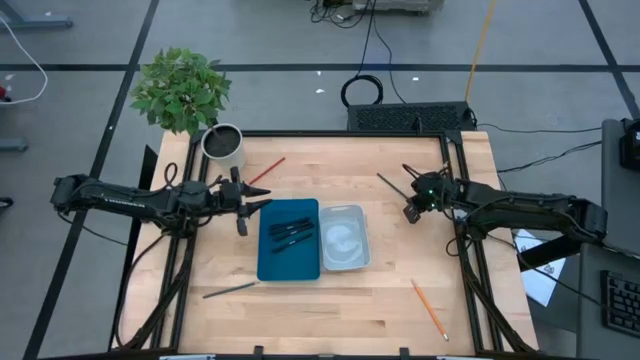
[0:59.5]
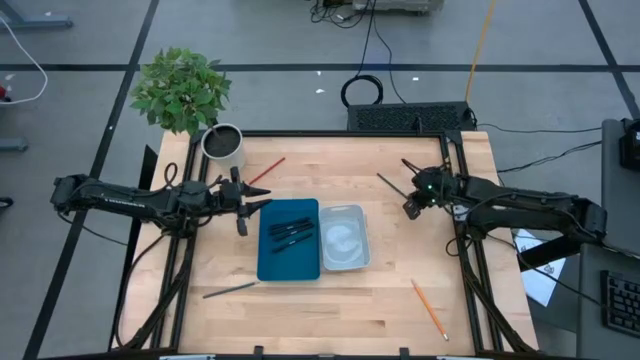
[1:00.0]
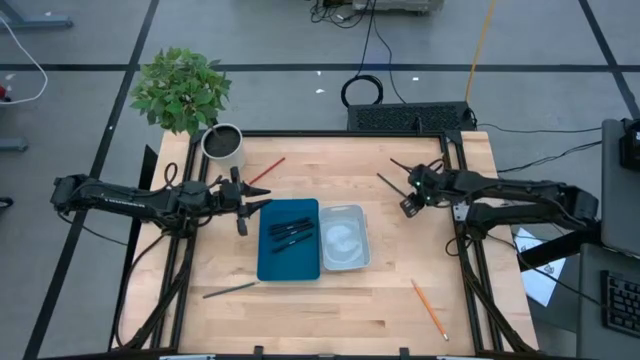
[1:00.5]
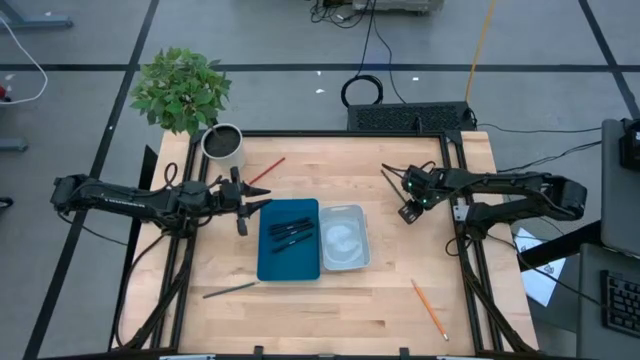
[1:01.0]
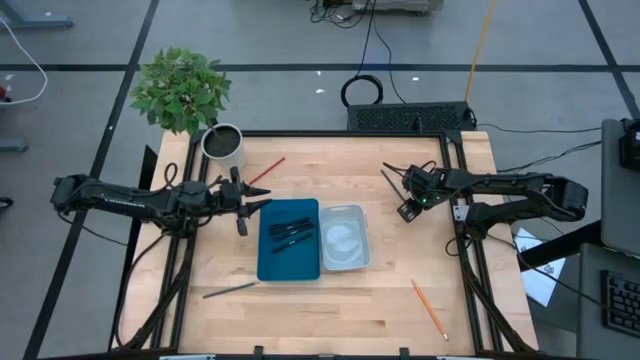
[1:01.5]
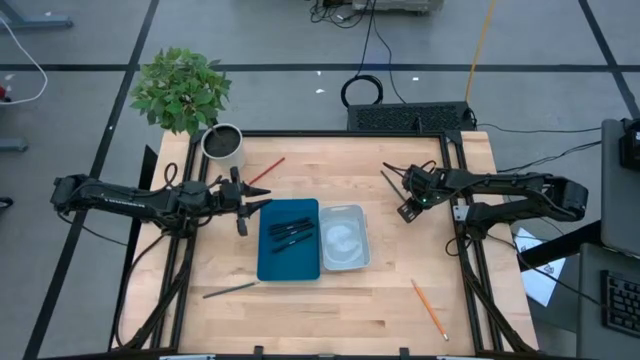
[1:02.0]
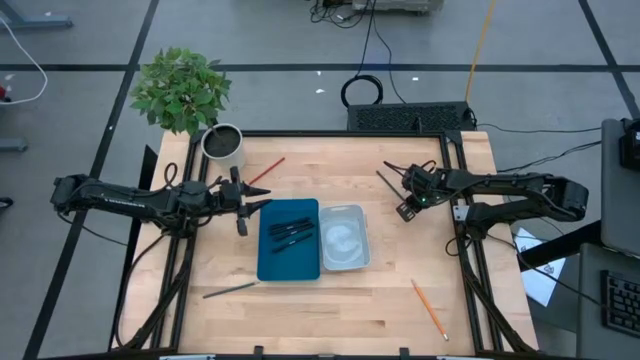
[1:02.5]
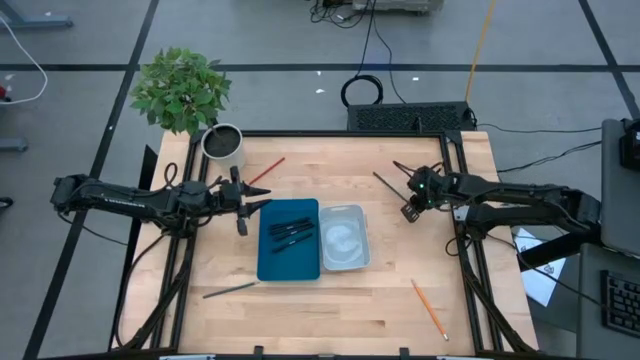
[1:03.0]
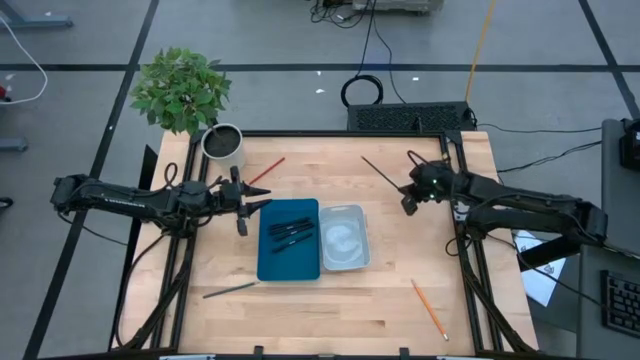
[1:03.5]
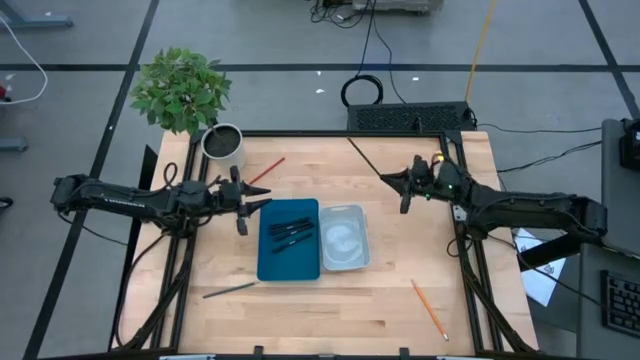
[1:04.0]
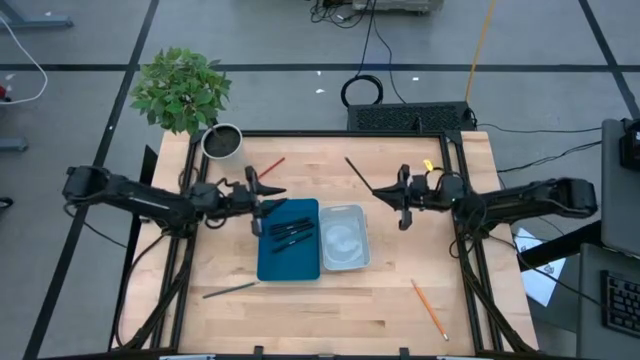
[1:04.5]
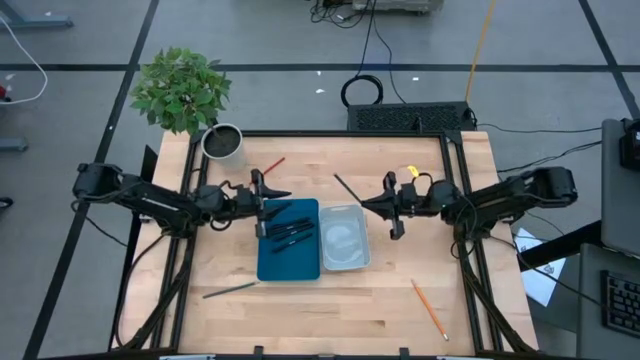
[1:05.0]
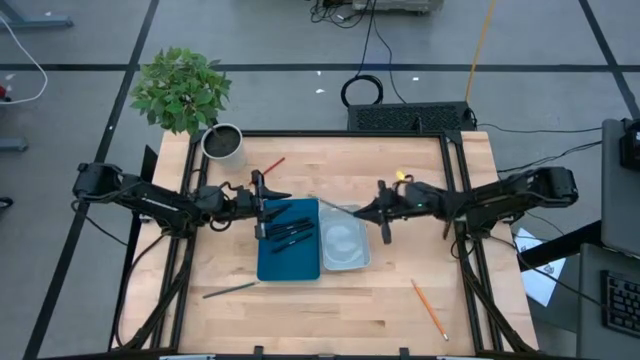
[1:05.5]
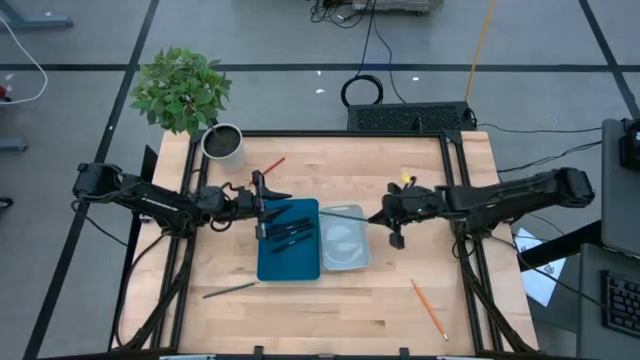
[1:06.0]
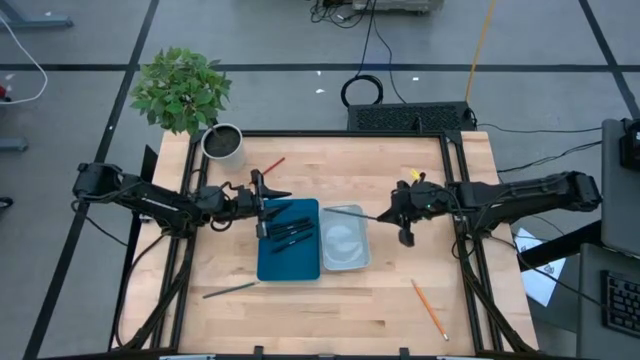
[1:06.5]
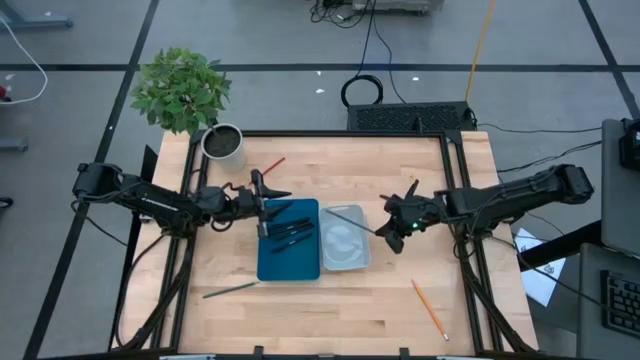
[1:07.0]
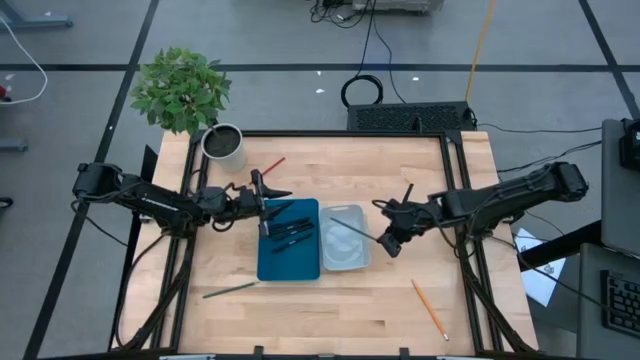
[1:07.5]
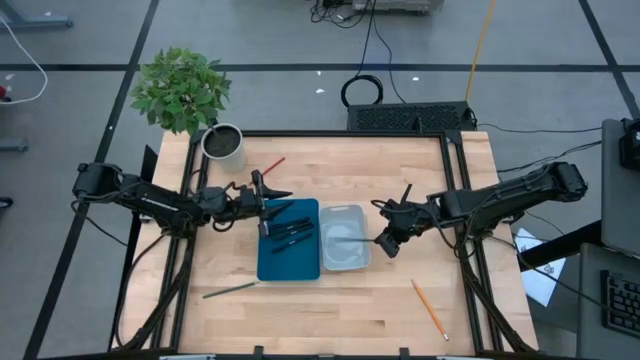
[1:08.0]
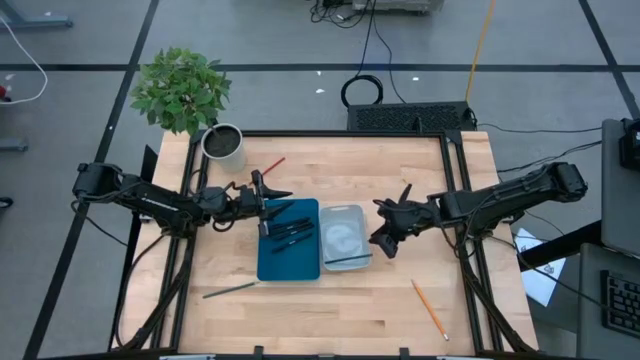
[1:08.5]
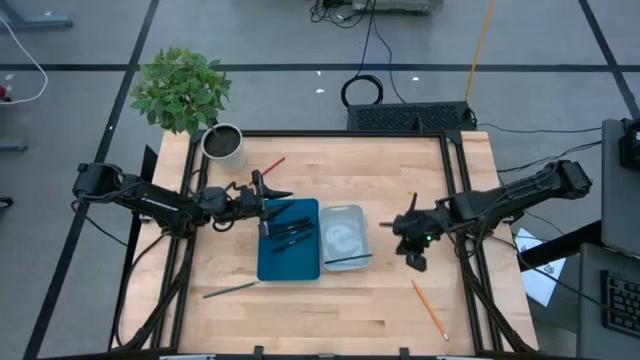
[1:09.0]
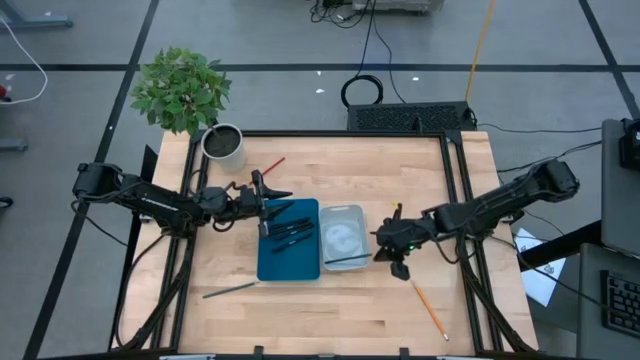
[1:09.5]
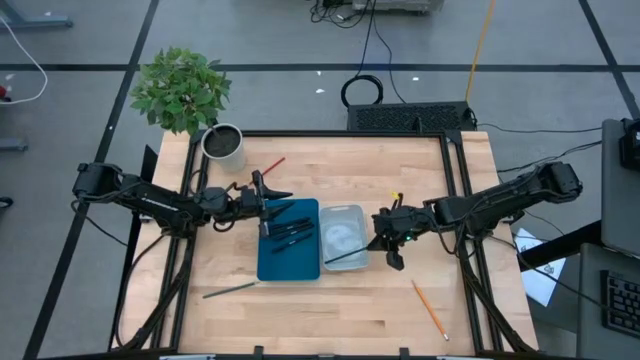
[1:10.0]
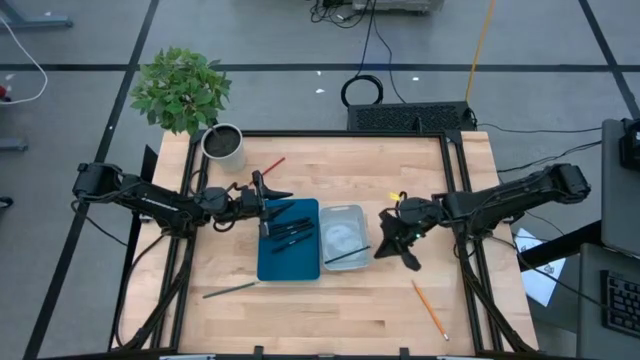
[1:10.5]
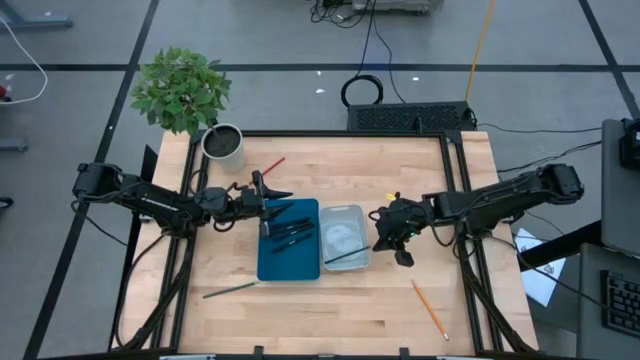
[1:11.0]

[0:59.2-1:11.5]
Task: Sort pens & pencils
Put the top green colored pencil into the white bin

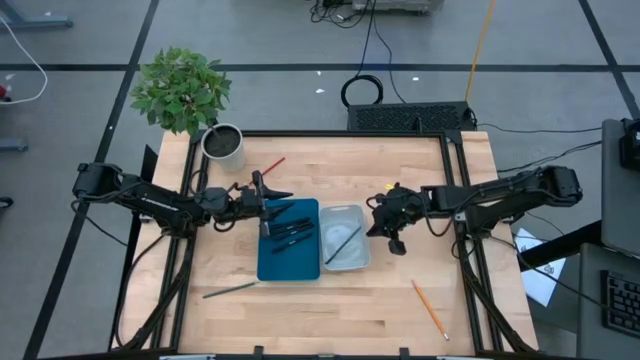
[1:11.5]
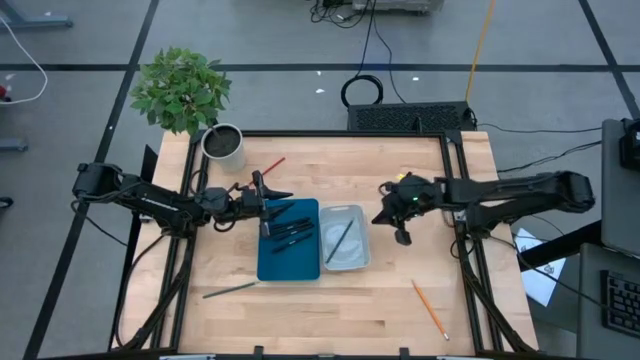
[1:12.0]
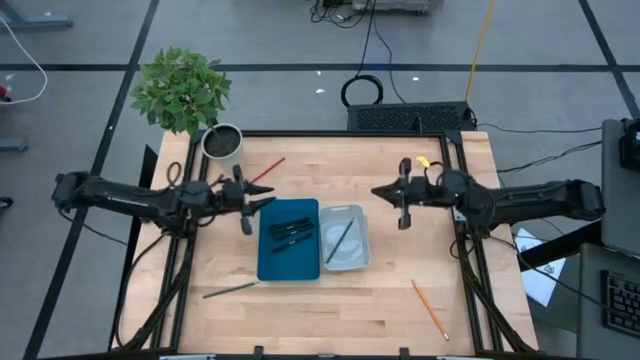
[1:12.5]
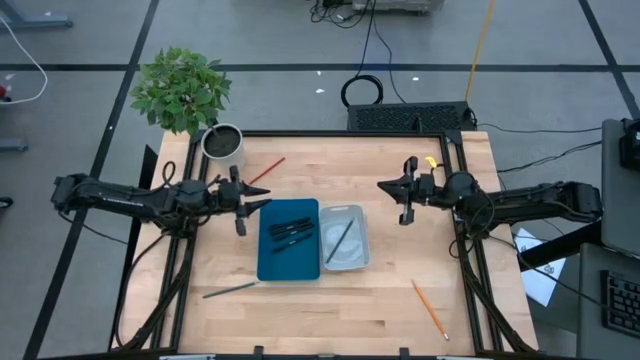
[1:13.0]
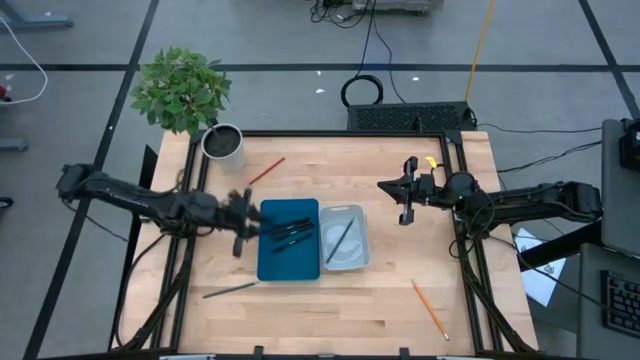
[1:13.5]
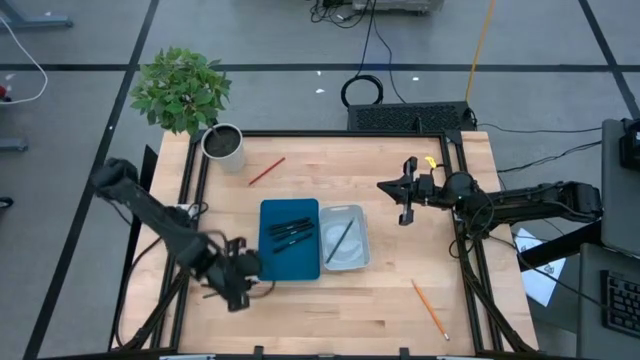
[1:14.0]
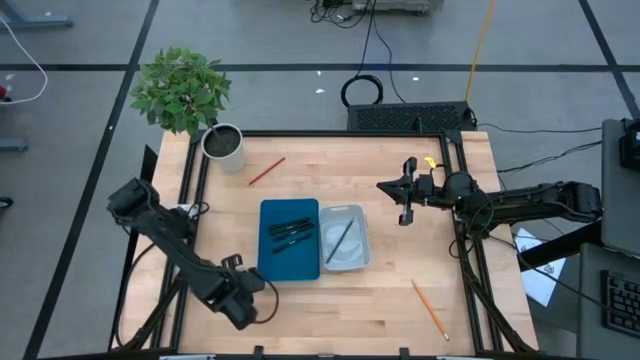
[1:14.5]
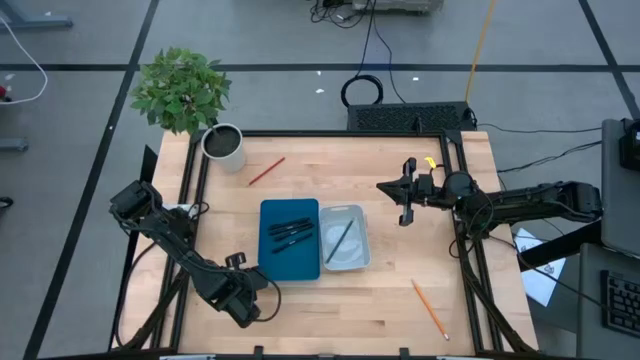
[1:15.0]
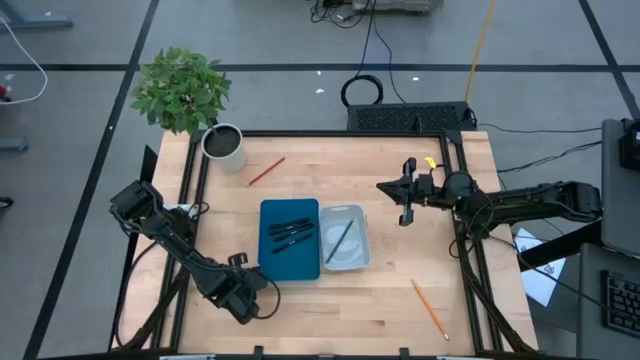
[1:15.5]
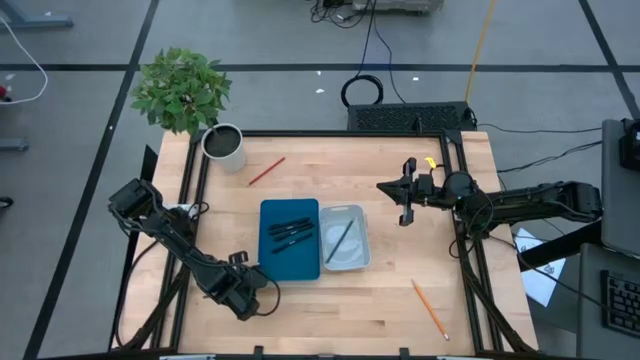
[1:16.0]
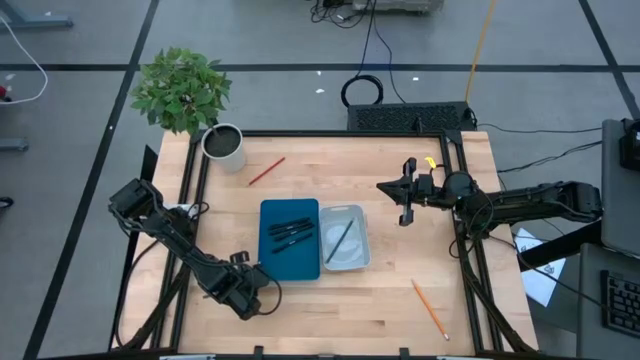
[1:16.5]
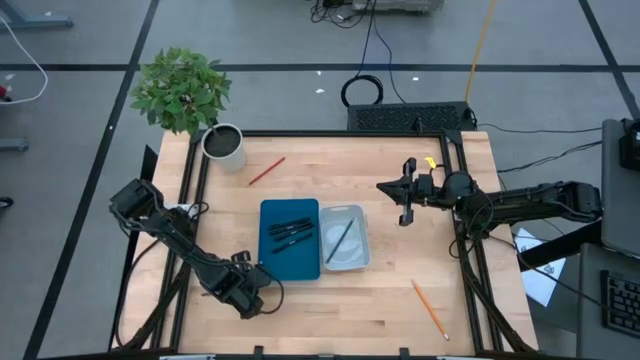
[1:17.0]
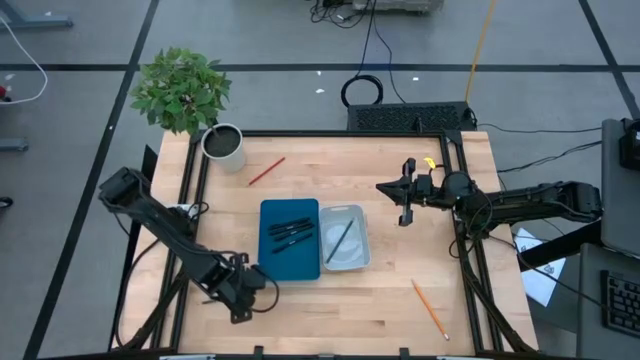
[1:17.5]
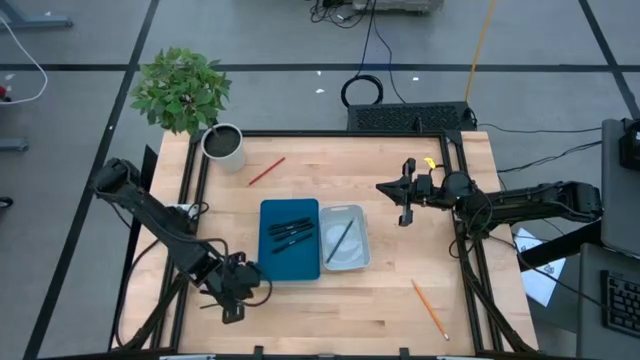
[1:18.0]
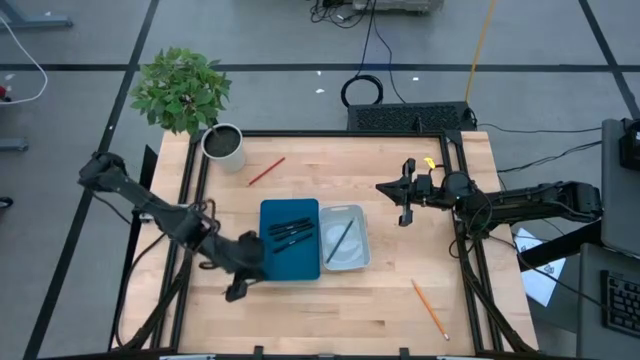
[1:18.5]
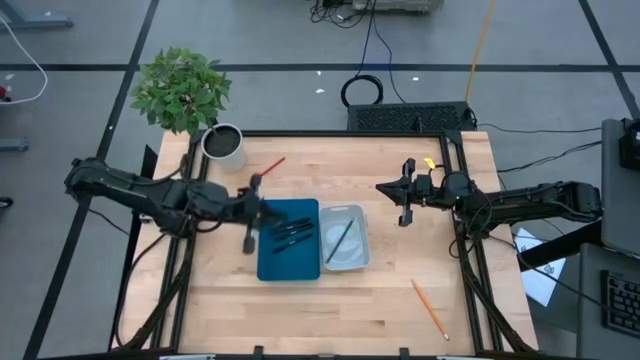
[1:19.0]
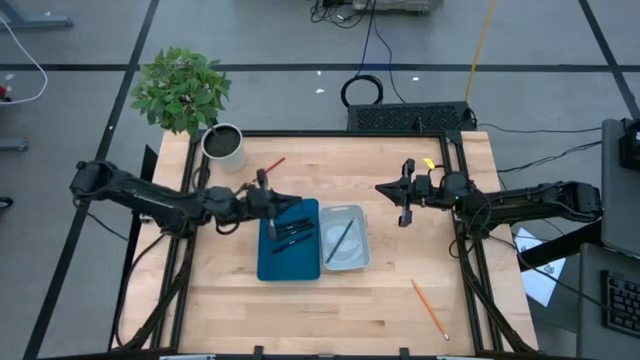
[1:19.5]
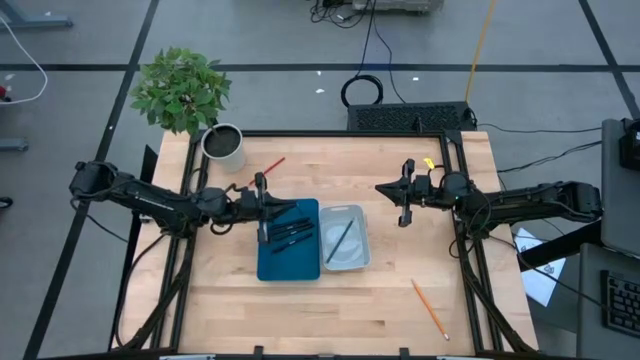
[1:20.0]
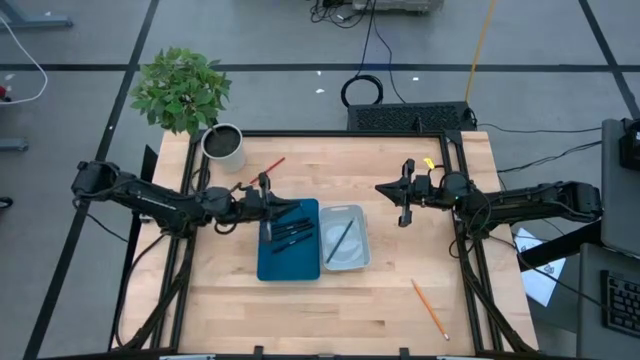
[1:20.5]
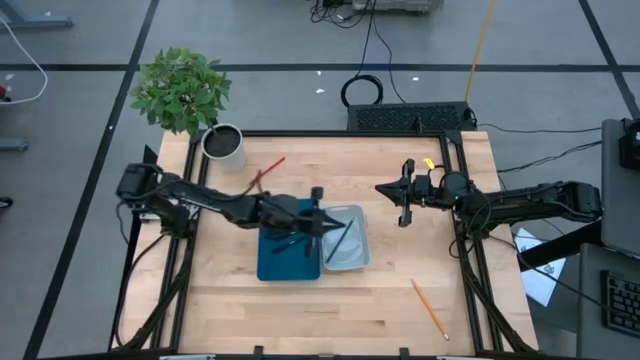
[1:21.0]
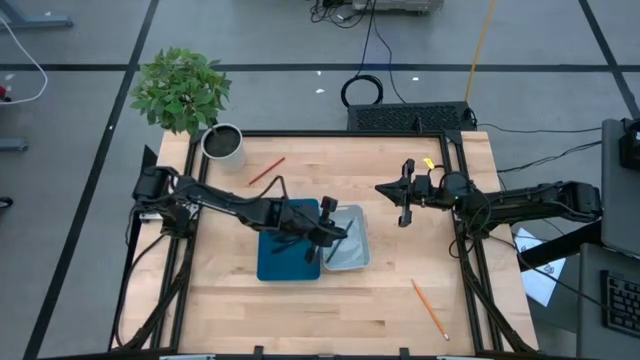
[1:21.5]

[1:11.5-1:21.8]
Put the green colored pencil into the white bin
